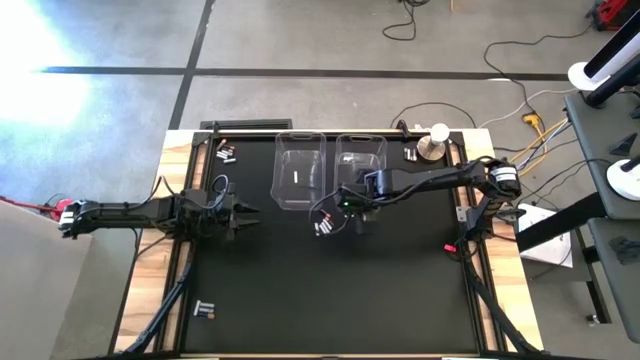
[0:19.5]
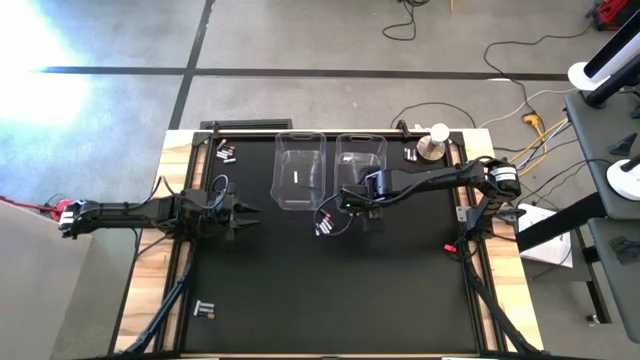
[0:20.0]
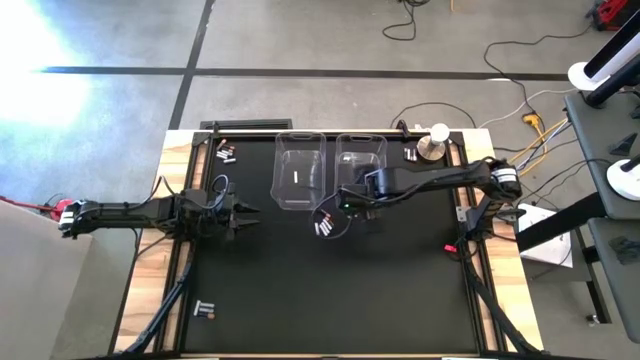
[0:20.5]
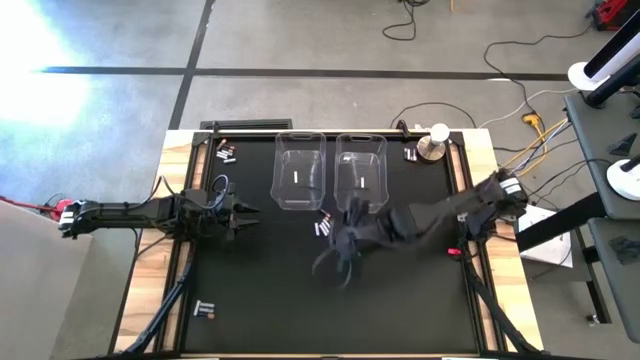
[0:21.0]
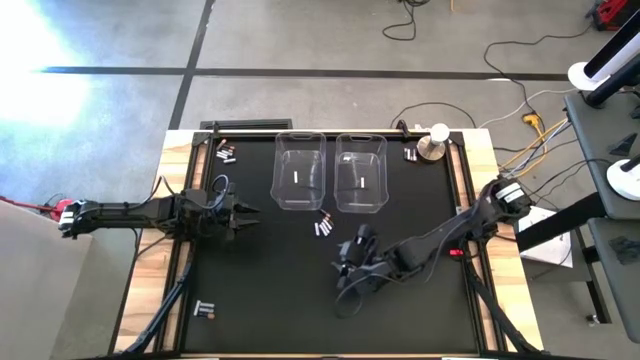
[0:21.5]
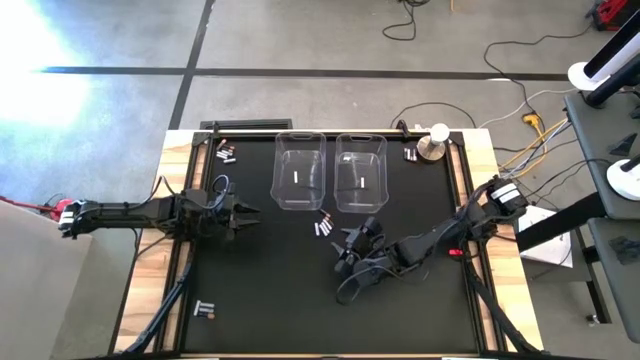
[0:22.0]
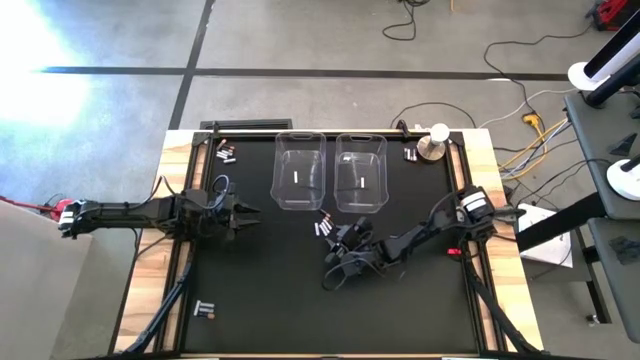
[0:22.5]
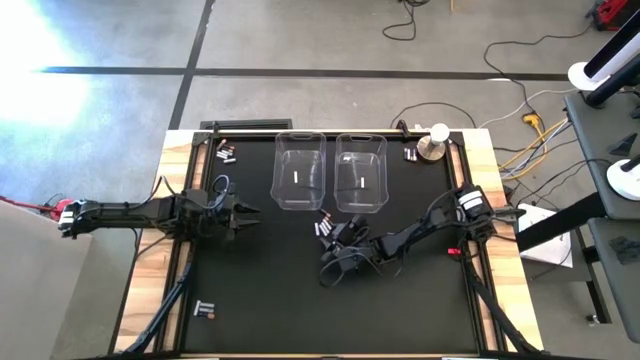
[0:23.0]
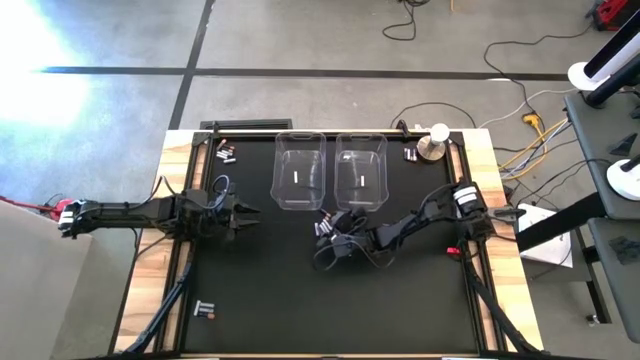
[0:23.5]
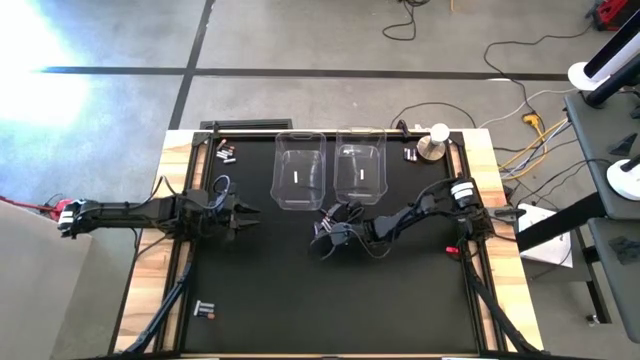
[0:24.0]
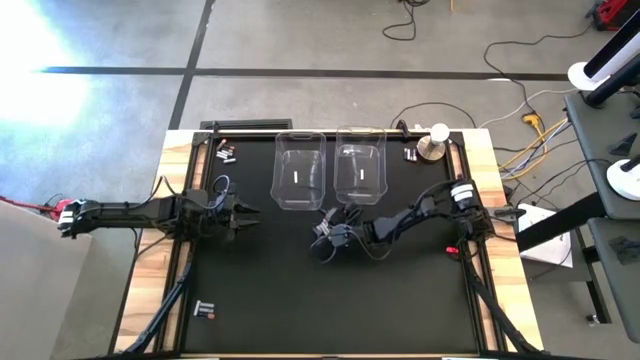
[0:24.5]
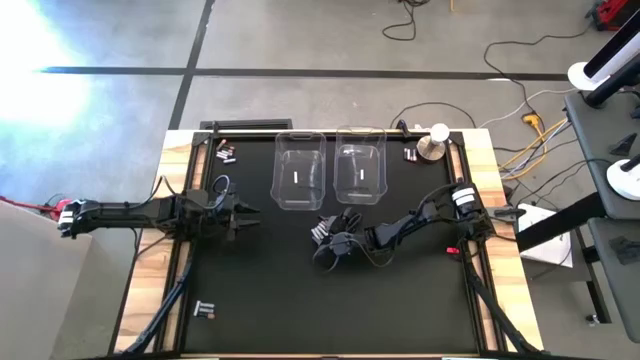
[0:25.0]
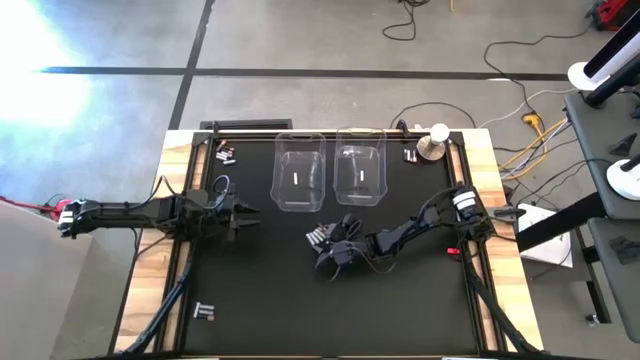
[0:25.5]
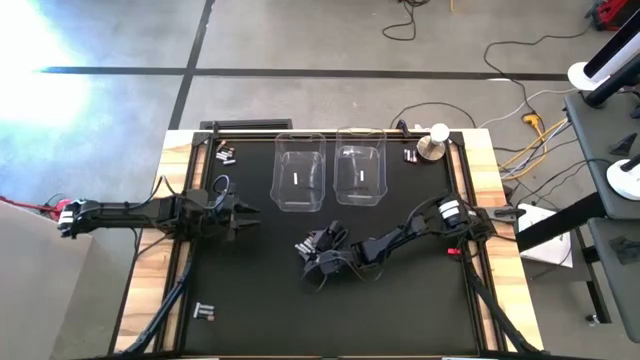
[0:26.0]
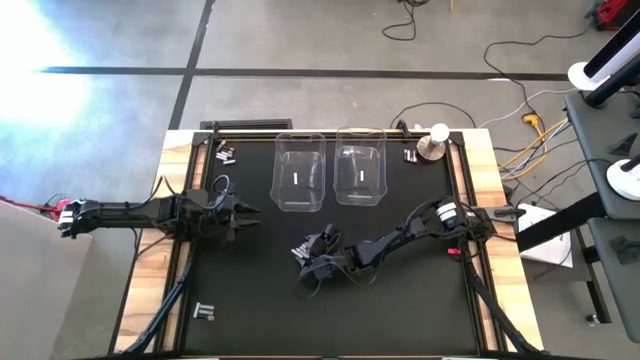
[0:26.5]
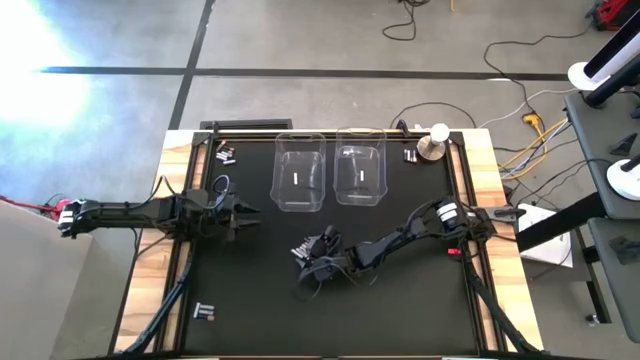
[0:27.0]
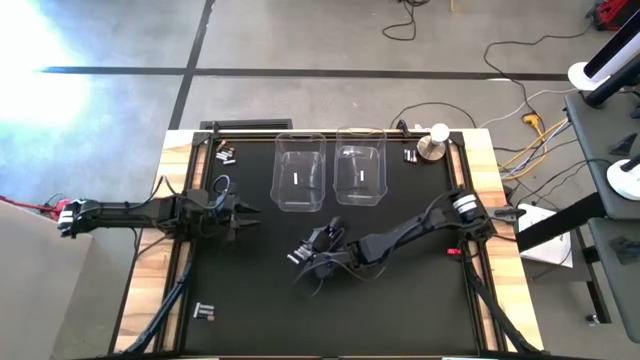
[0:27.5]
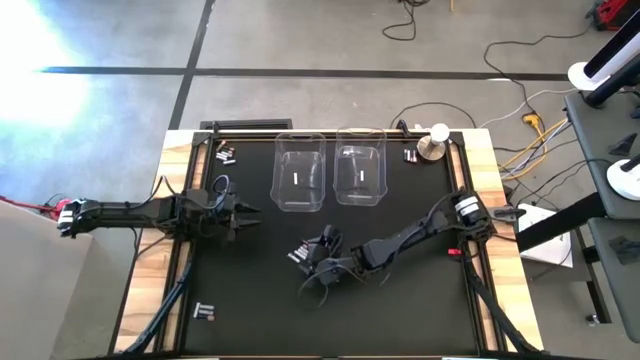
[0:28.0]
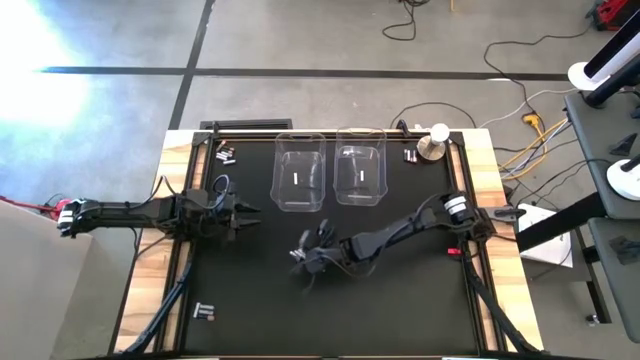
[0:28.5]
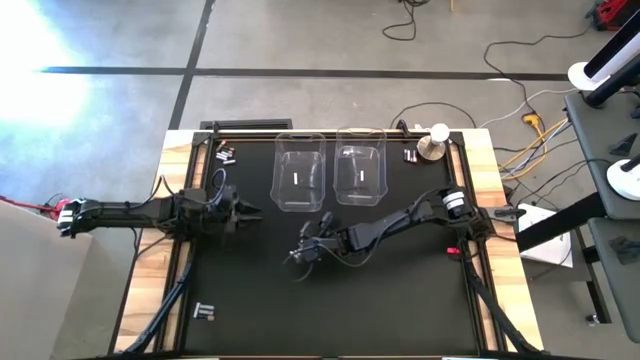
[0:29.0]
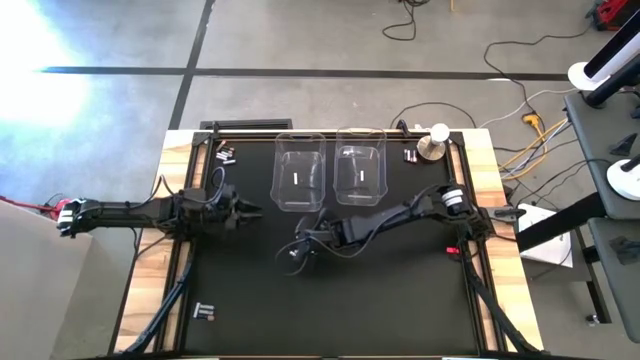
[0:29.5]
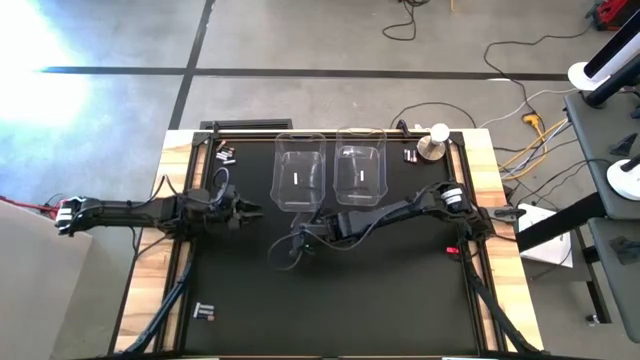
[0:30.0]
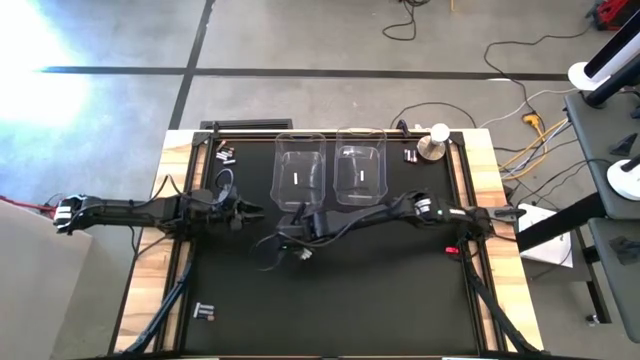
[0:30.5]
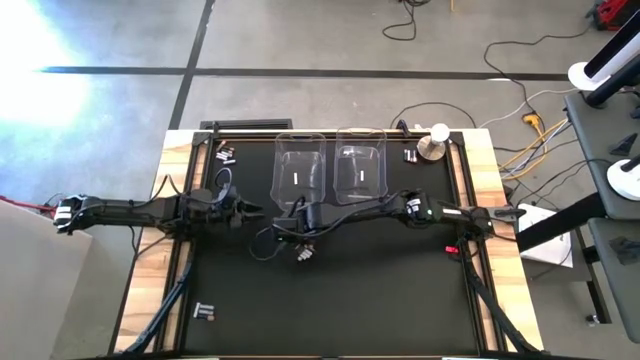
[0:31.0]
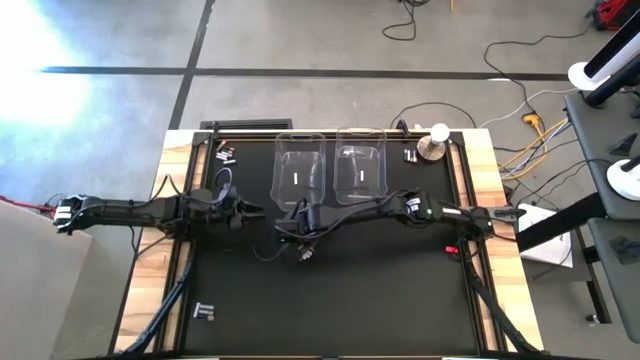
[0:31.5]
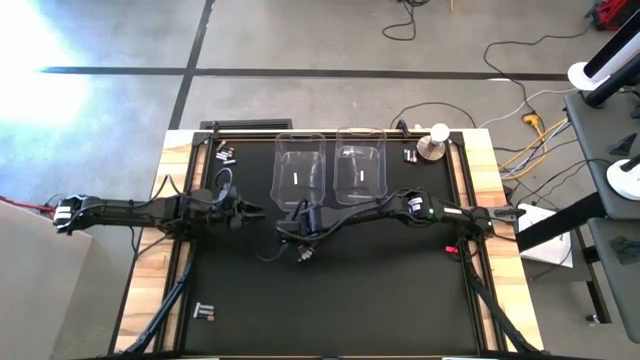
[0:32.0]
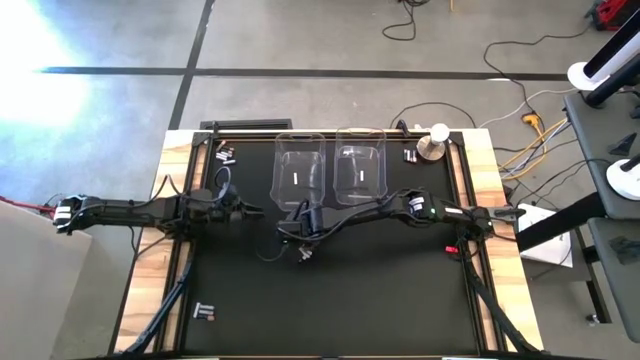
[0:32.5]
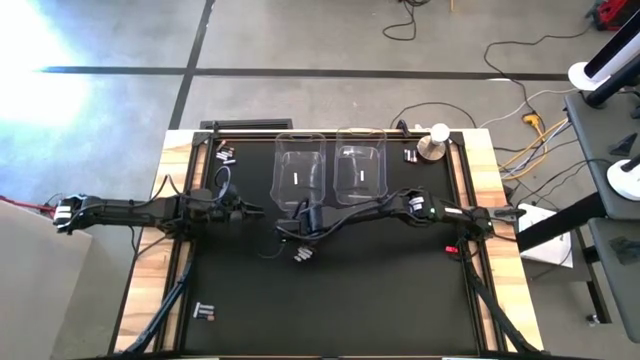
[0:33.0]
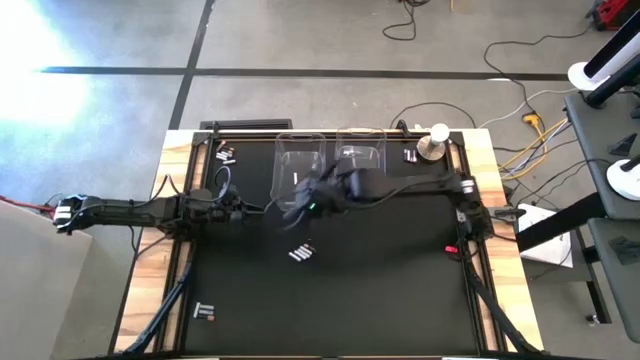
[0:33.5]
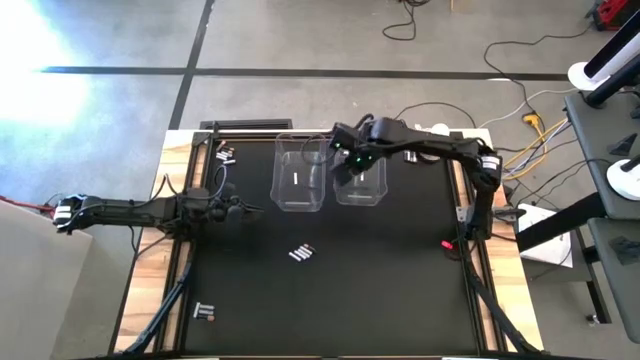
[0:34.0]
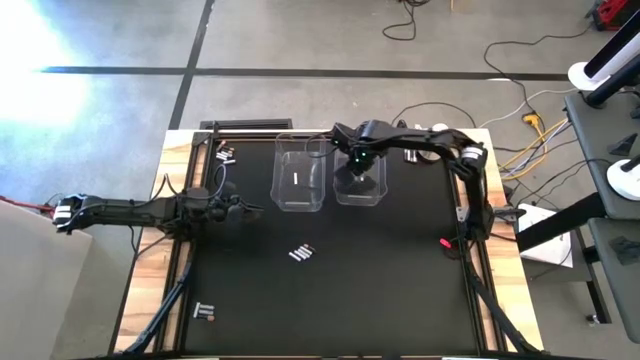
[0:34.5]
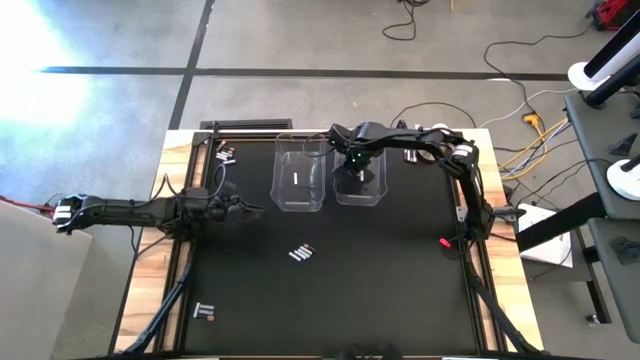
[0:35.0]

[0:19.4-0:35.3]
Task: Sort batteries
Put the black battery into the right transparent bin

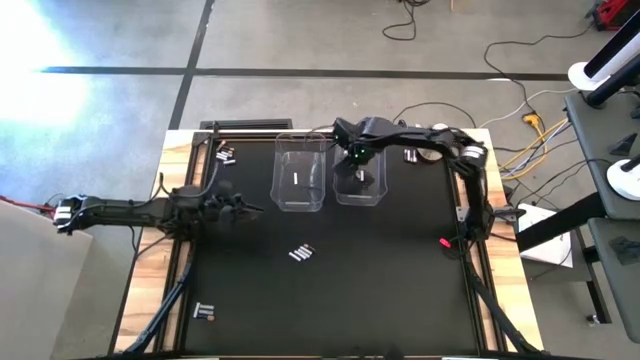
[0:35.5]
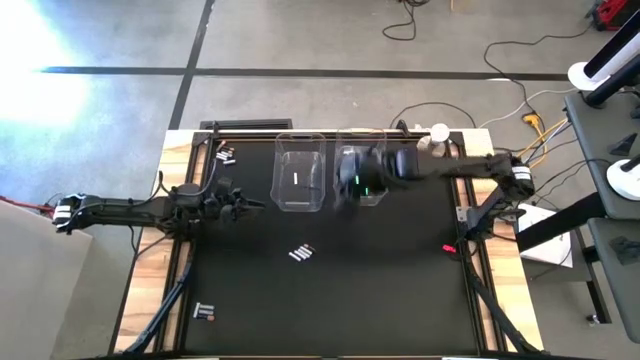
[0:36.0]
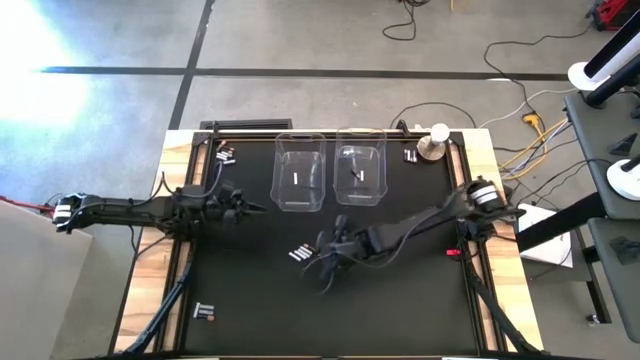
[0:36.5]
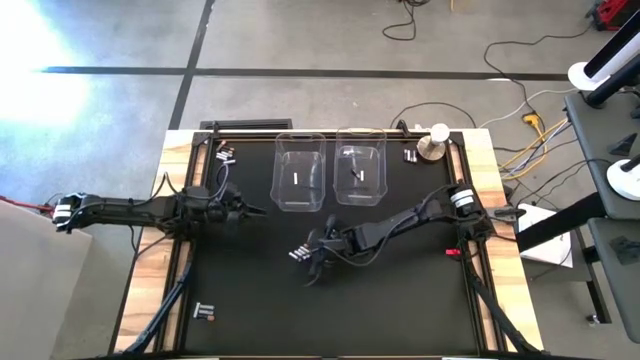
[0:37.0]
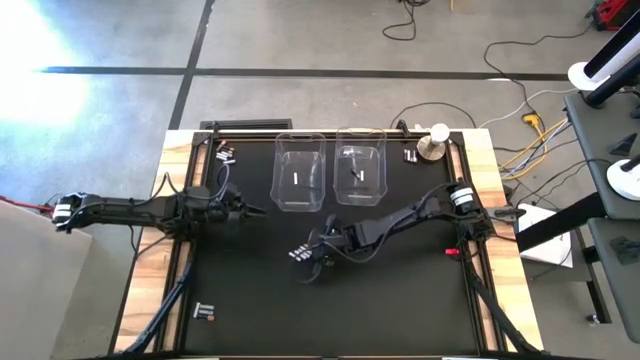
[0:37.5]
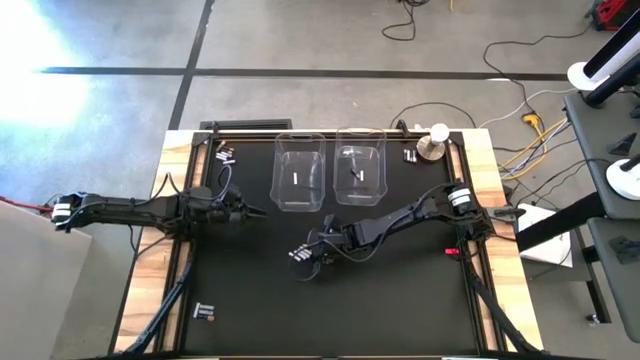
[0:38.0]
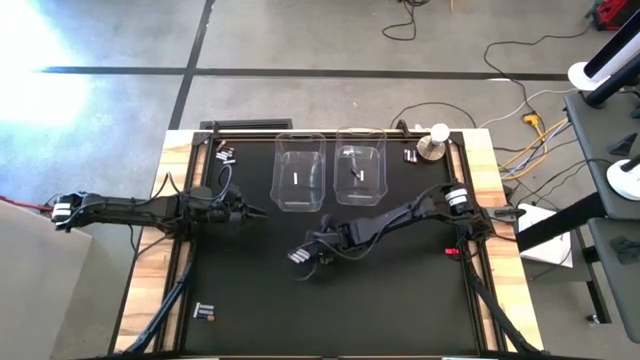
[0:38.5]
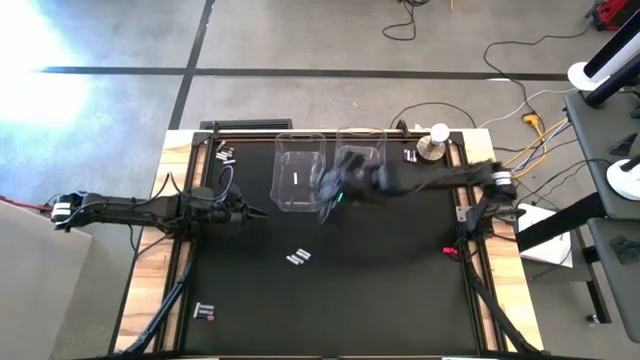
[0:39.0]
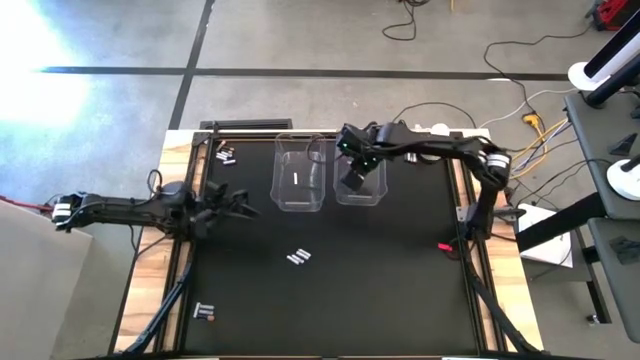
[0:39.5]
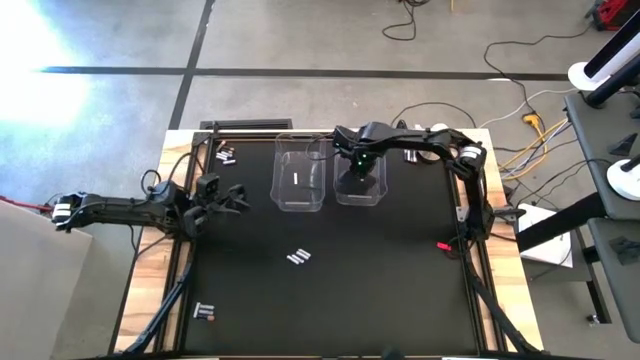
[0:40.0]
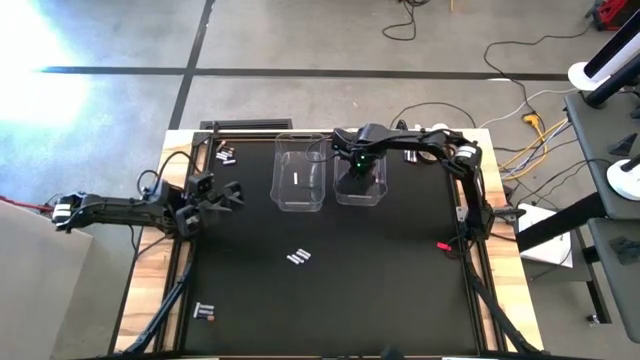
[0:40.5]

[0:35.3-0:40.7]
Put the black battery into the right transparent bin
